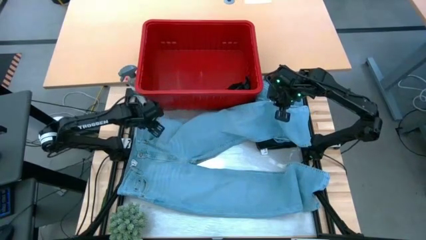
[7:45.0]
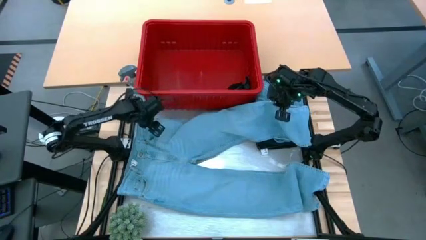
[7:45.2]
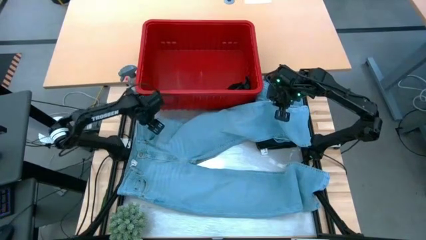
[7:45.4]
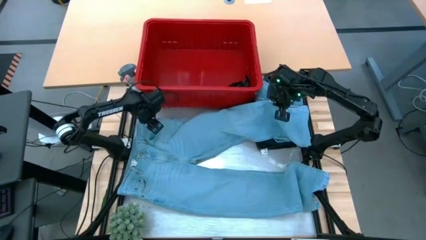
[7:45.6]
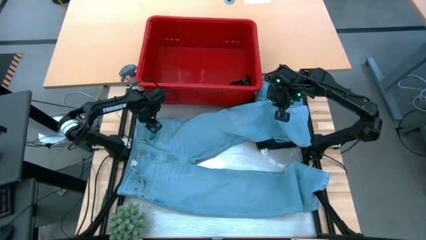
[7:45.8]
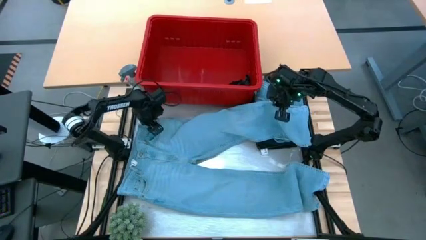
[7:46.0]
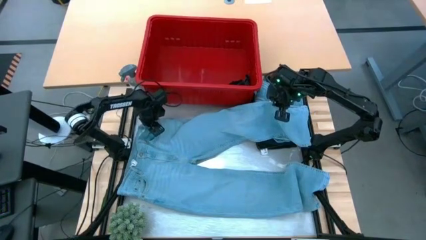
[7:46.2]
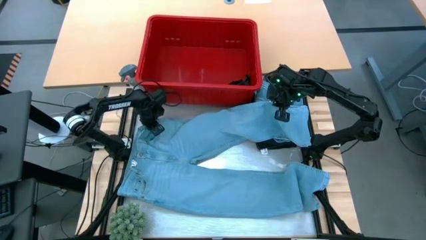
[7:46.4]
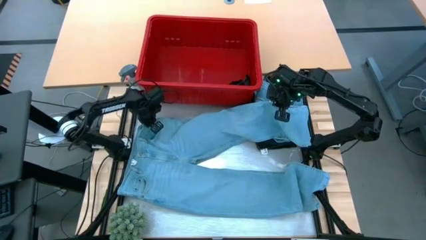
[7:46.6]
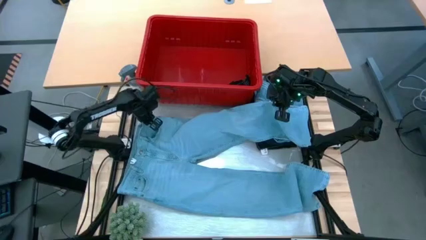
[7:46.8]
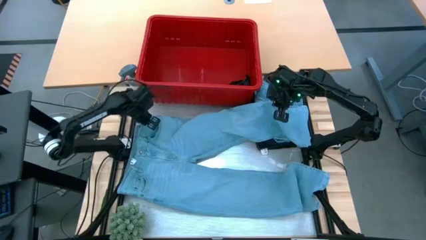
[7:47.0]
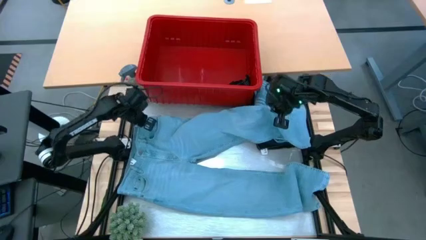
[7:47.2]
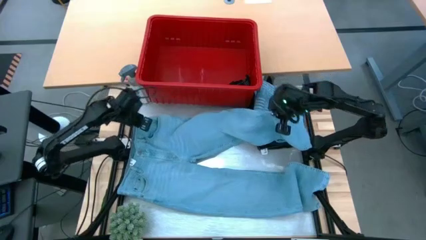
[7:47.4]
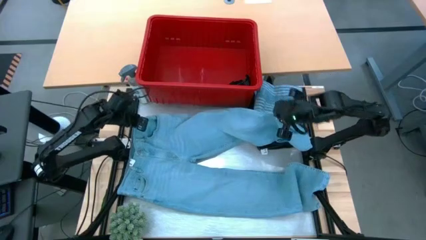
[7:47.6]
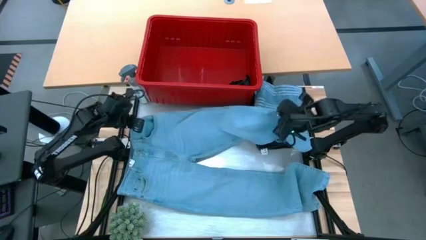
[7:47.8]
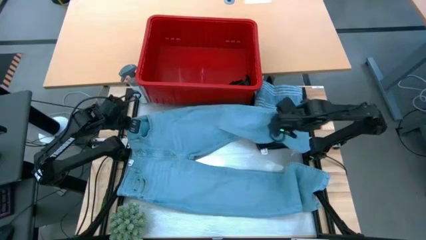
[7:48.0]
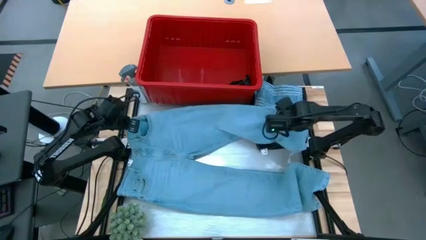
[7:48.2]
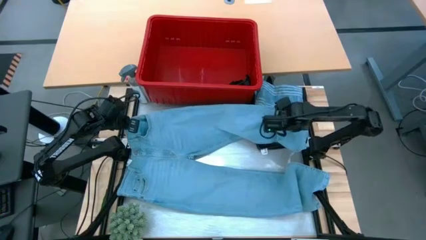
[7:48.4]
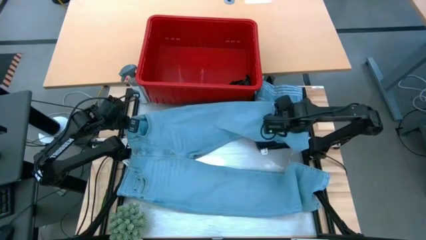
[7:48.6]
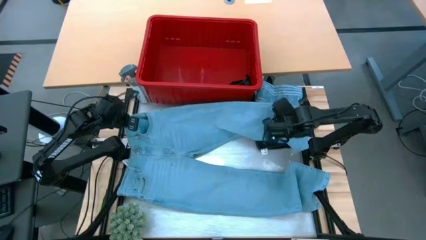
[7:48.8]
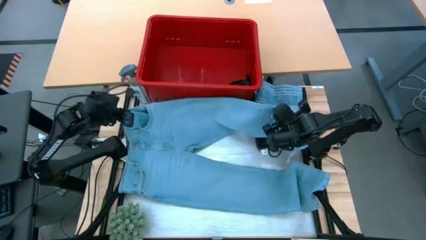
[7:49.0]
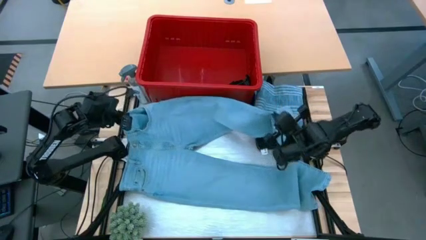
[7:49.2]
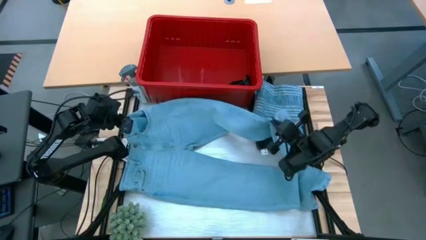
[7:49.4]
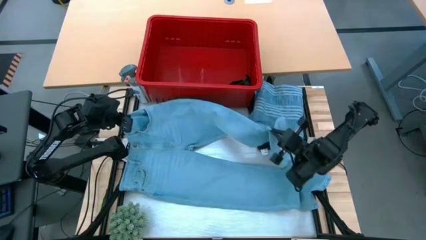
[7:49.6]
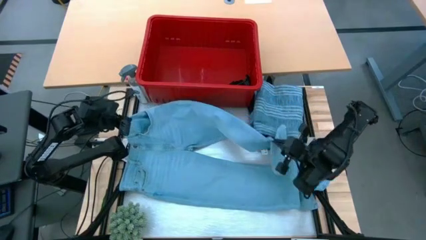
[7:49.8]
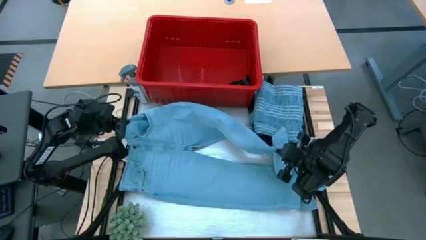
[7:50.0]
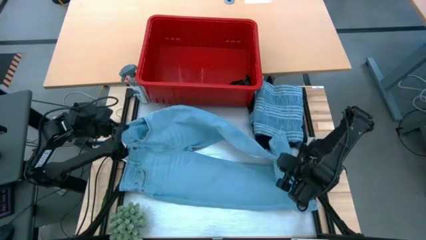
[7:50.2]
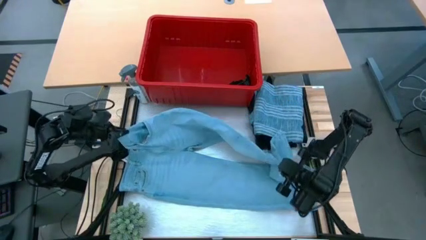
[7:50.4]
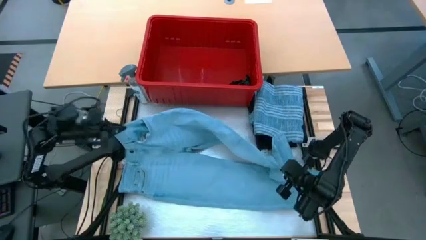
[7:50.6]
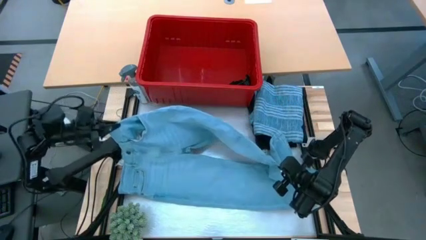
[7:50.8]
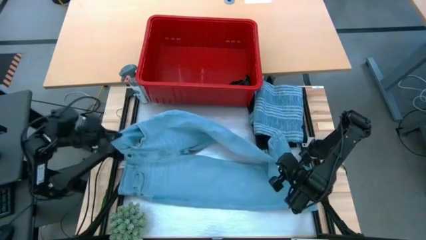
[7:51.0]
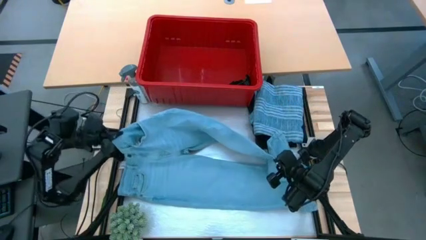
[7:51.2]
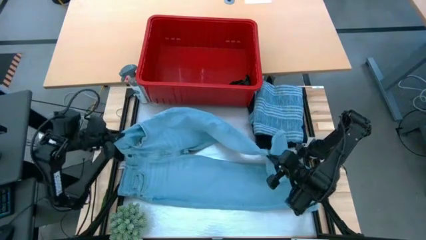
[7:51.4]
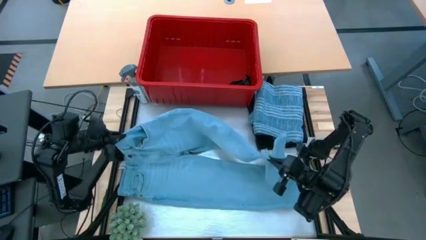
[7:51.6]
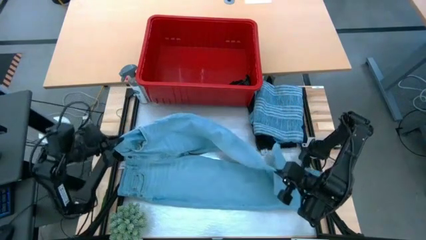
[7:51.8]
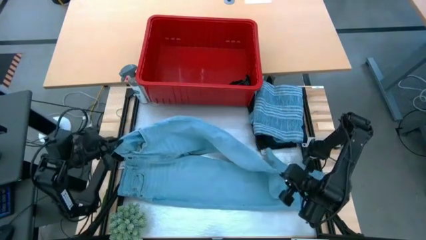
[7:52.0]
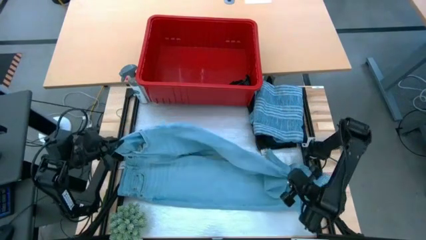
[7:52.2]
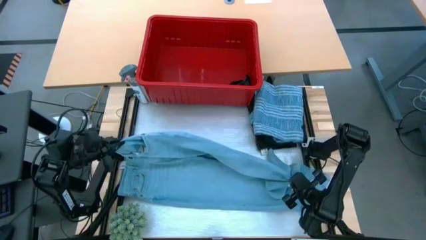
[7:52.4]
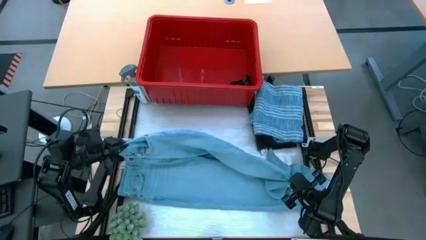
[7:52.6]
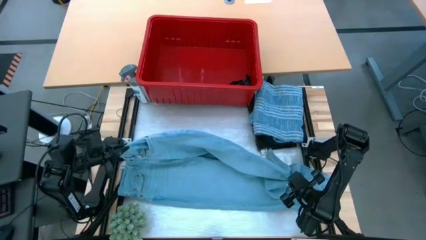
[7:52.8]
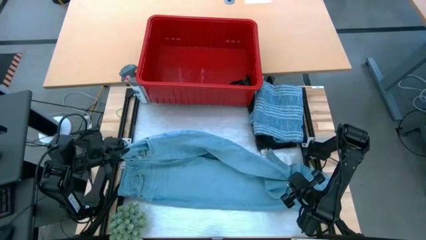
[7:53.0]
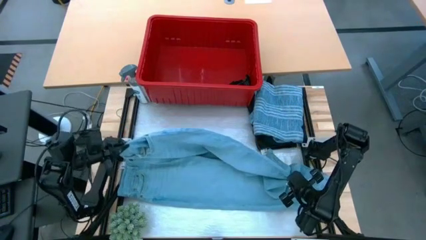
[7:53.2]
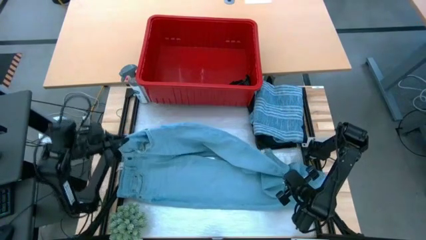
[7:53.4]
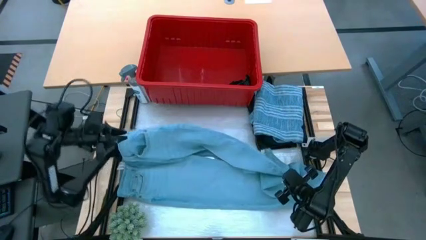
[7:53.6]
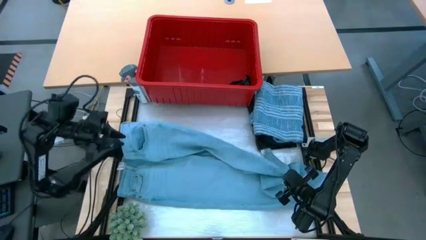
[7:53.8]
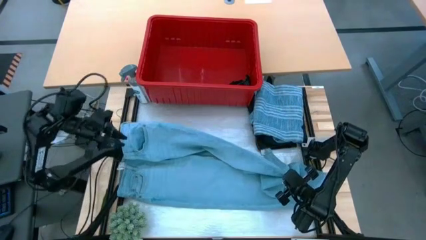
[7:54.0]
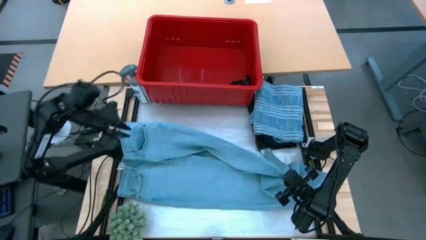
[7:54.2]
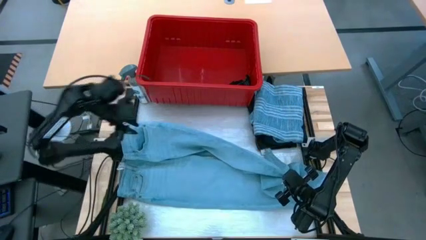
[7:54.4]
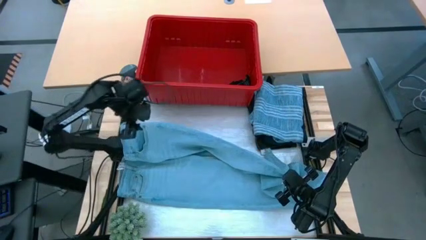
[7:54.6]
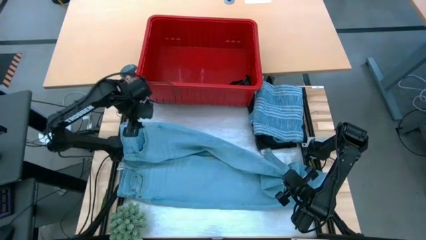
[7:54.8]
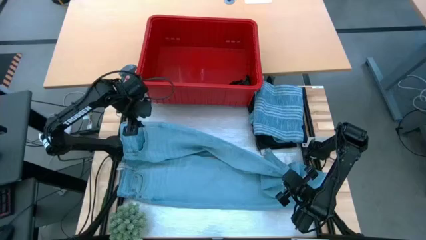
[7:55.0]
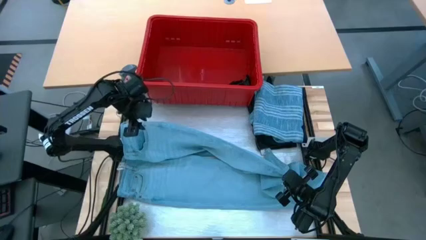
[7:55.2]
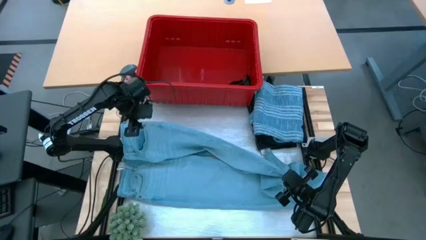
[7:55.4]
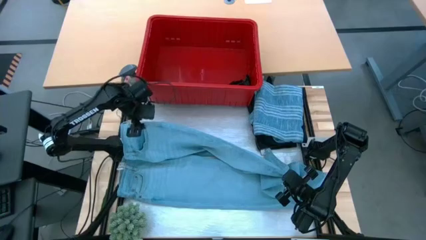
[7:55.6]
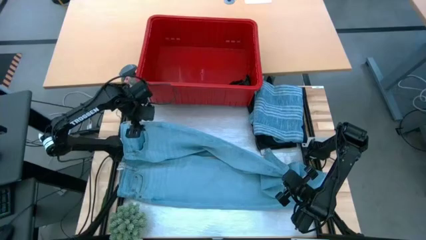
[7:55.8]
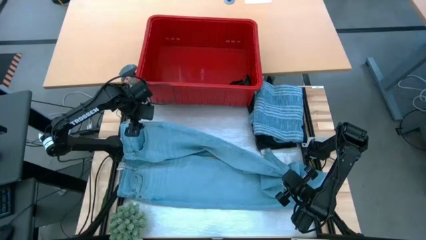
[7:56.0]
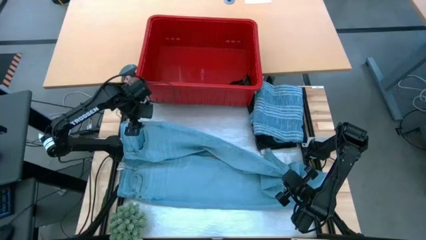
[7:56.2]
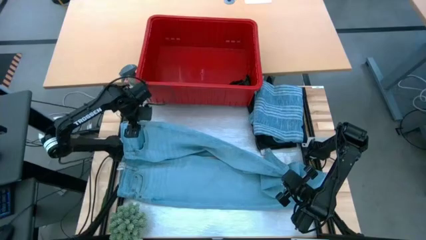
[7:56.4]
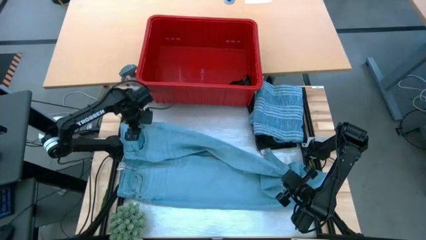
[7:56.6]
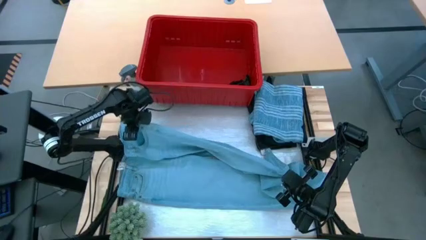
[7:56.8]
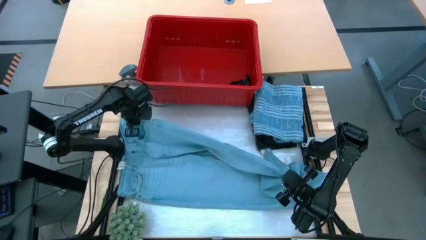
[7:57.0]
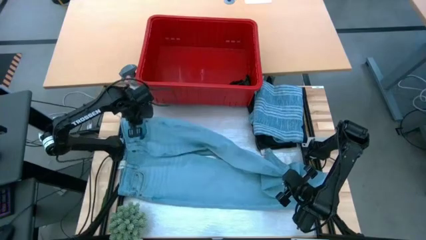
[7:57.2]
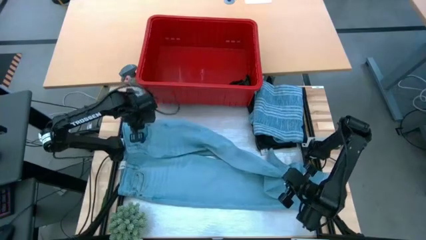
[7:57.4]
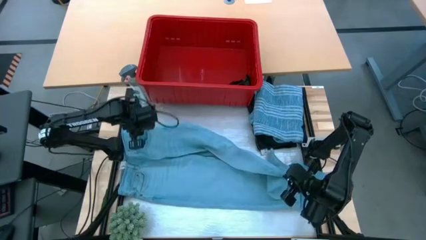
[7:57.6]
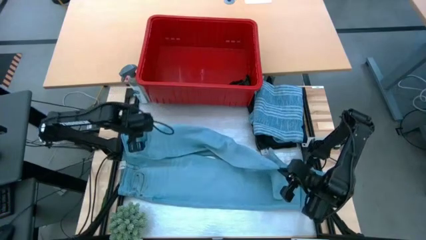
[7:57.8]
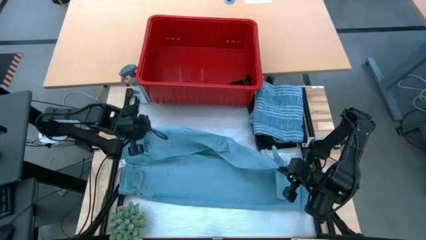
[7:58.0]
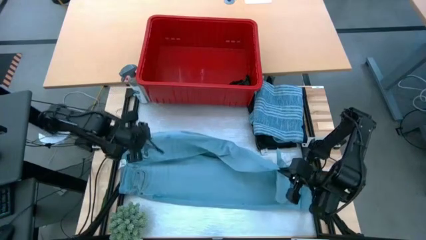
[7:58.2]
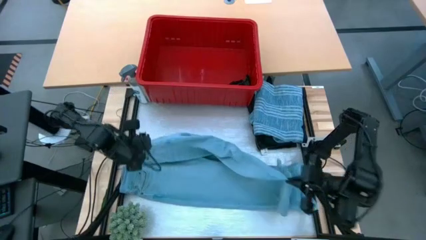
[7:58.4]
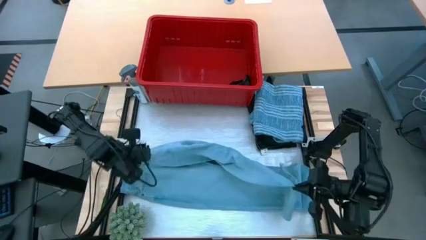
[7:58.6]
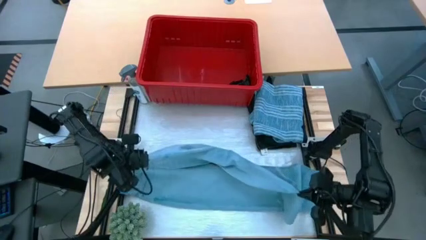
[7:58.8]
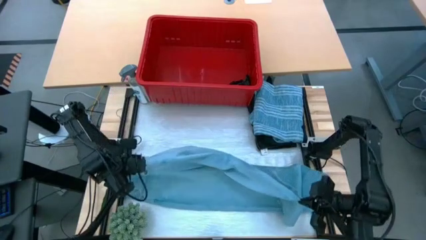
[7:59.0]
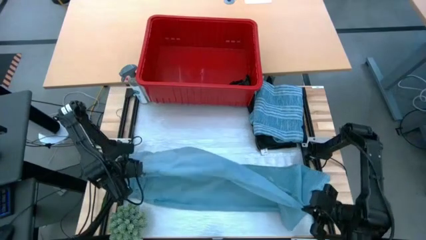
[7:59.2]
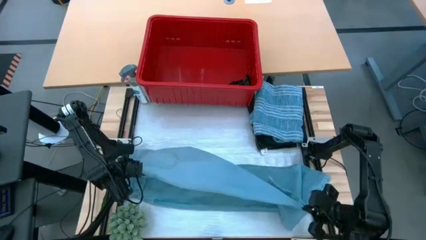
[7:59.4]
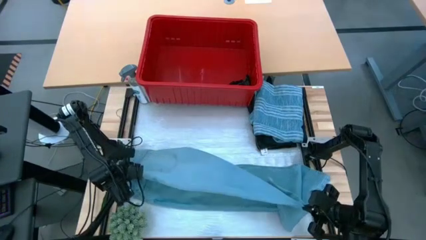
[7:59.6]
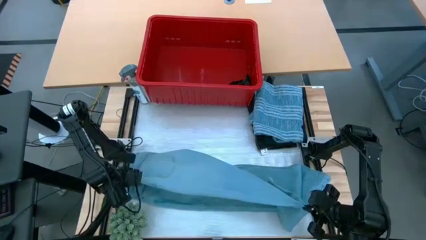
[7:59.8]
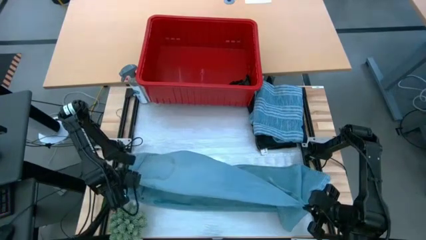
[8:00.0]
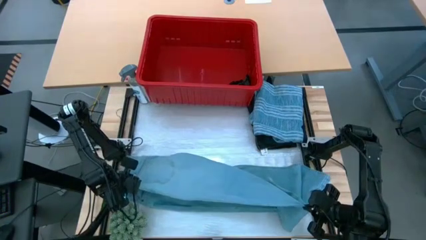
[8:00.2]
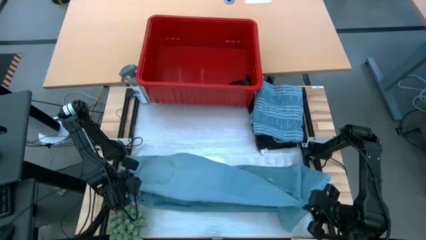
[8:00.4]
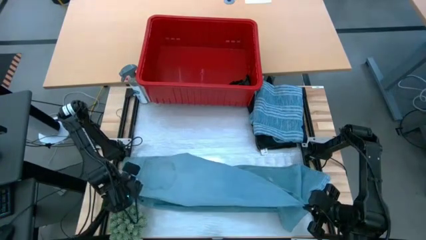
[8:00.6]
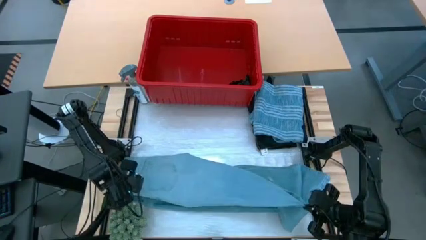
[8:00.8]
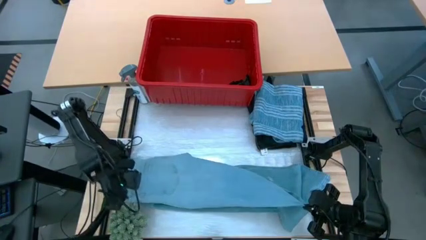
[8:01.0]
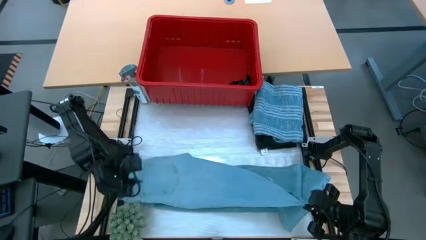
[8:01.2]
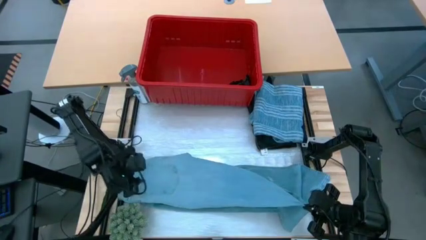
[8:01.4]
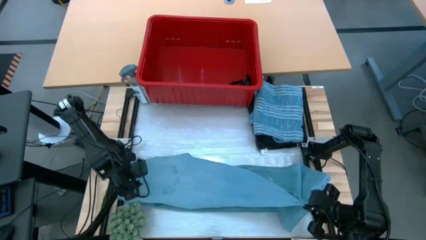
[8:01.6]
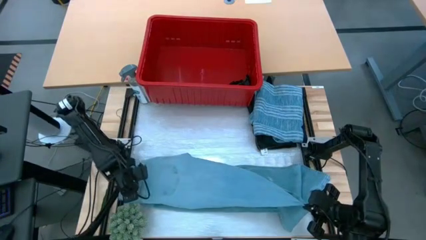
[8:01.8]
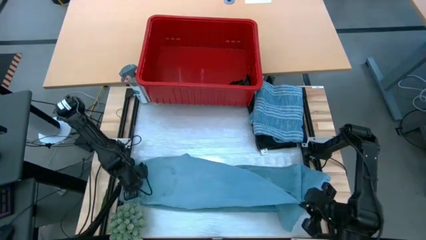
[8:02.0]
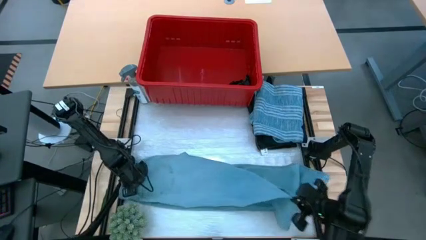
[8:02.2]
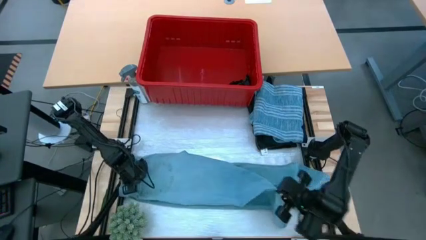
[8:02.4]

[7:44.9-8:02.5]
Task: Fold Laundry from Bin
Fold the light blue pants
